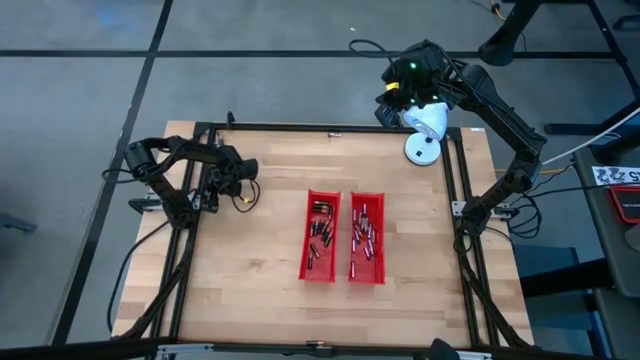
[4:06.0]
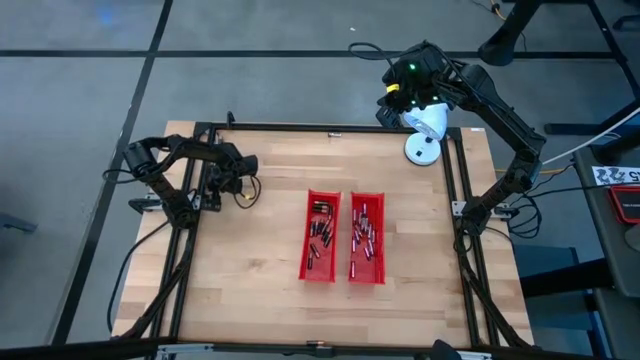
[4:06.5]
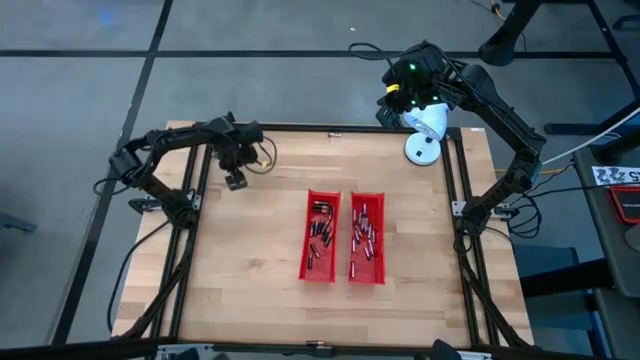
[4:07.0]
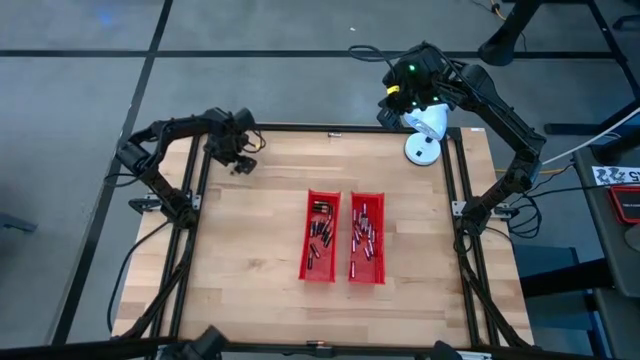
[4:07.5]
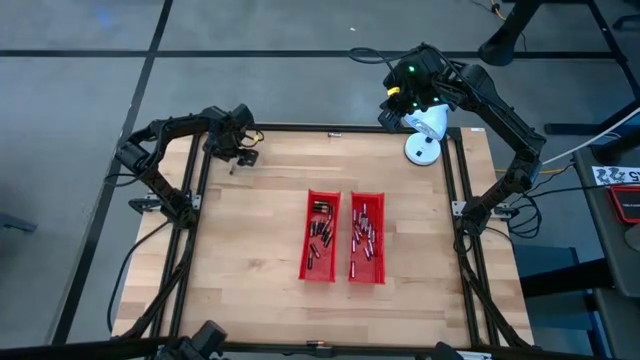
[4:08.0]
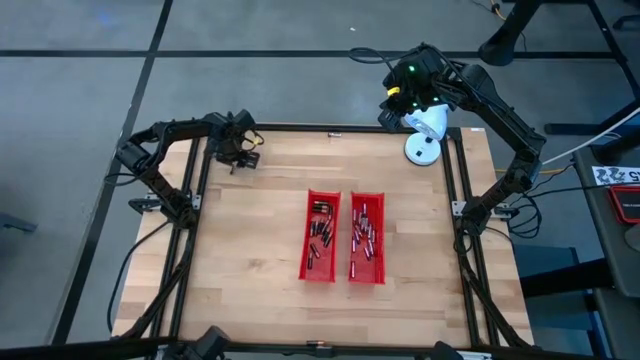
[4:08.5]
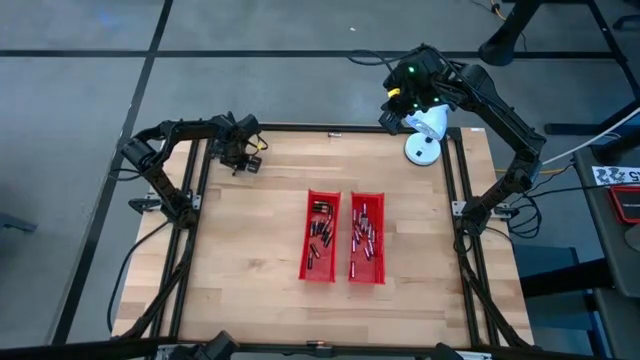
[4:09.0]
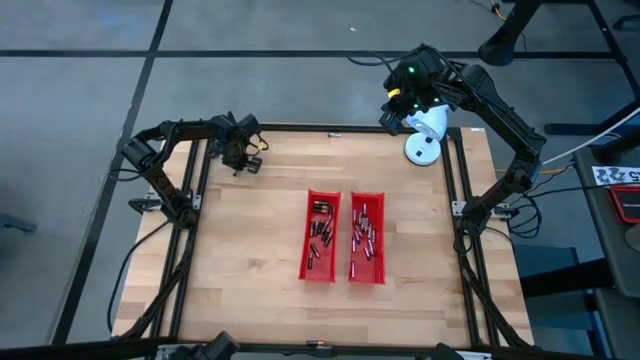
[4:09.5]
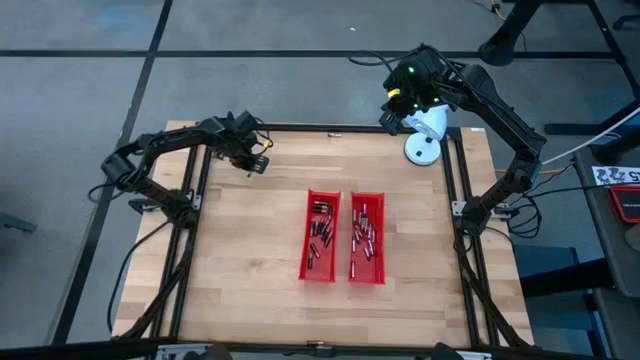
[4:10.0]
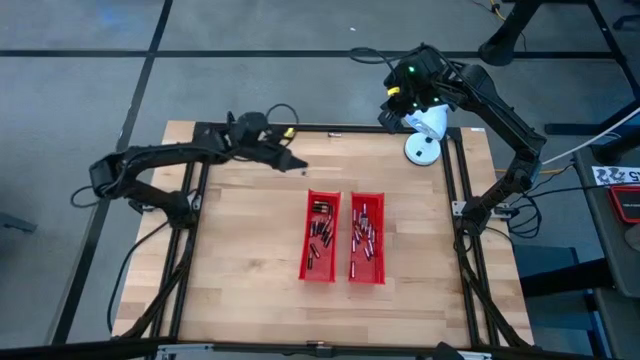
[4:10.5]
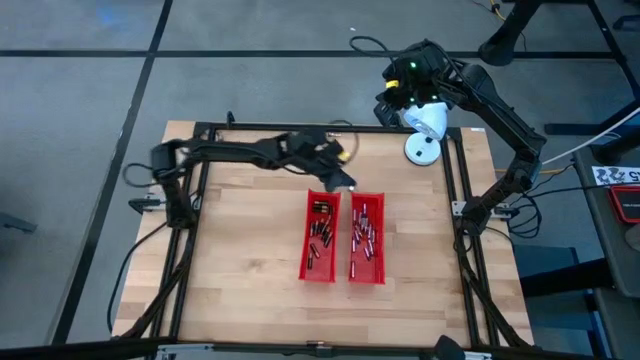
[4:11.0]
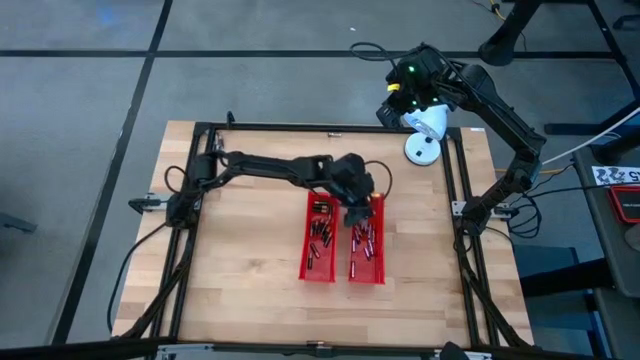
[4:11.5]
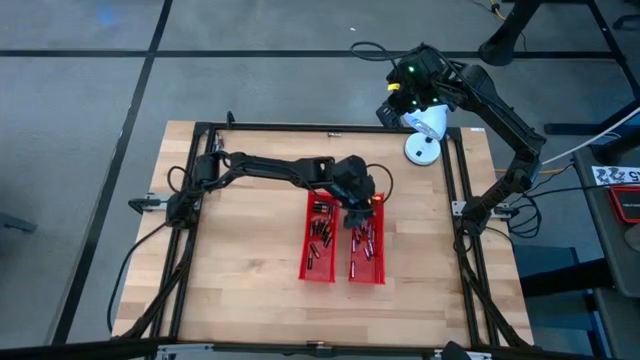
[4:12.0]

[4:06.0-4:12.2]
Task: Sort batteries
Put the silver battery into the right red bin

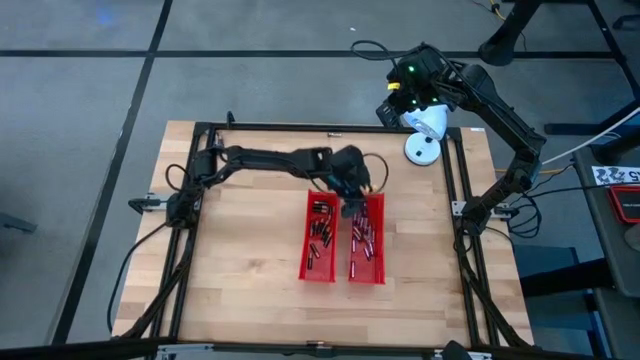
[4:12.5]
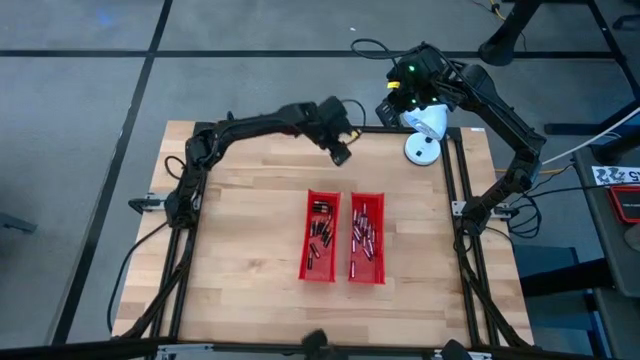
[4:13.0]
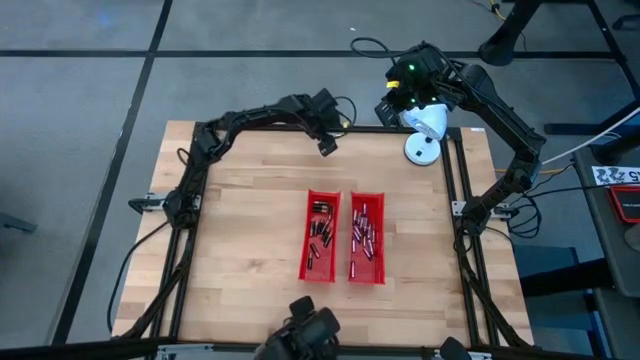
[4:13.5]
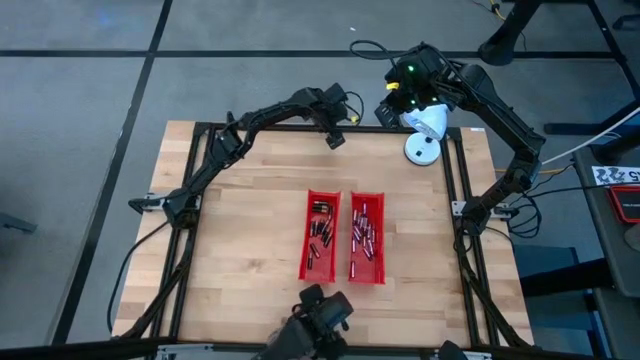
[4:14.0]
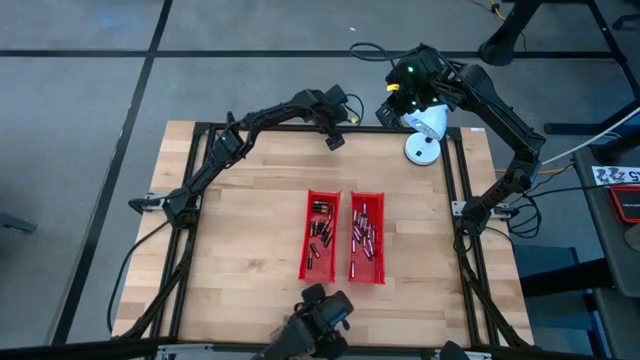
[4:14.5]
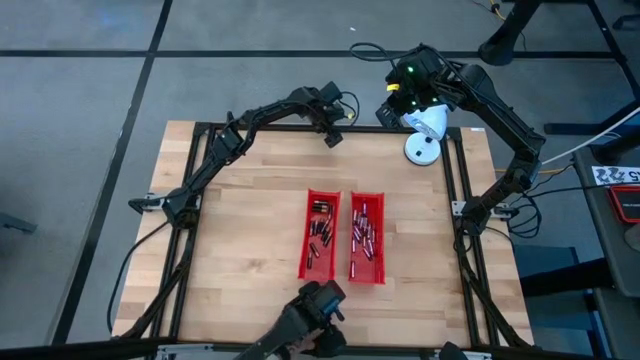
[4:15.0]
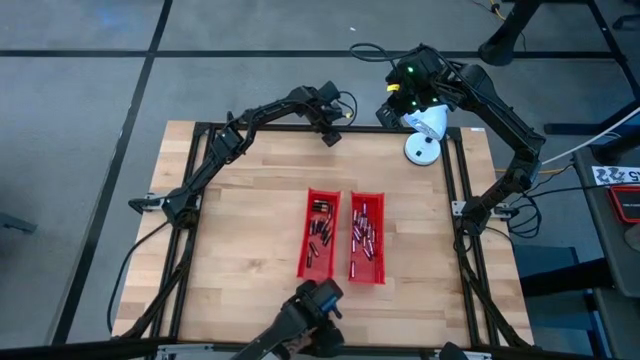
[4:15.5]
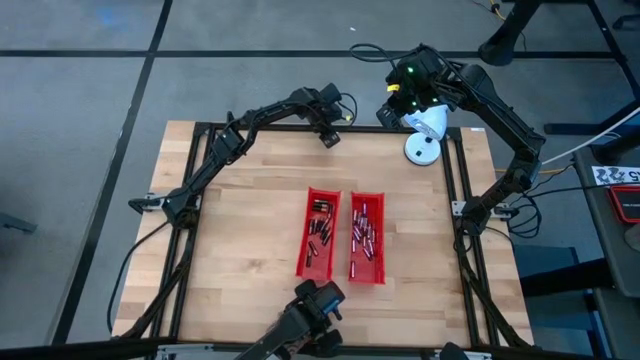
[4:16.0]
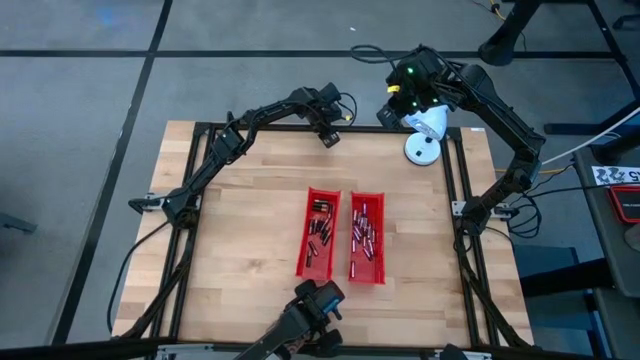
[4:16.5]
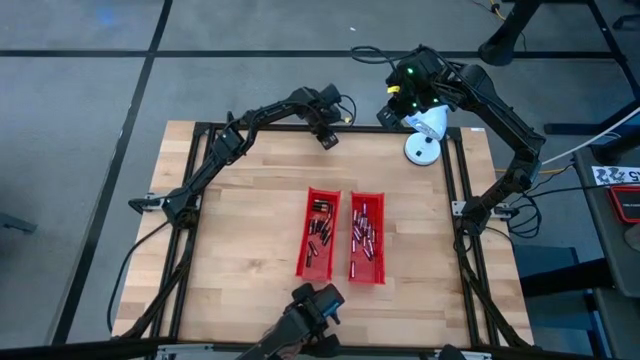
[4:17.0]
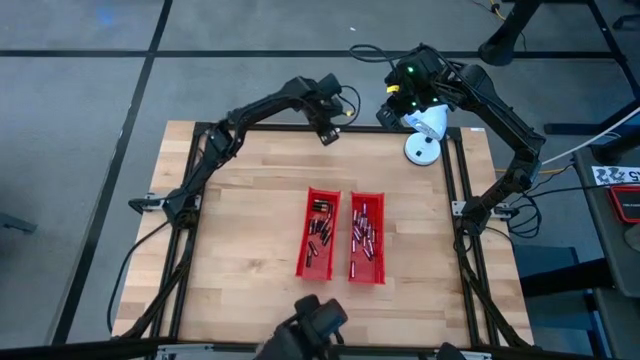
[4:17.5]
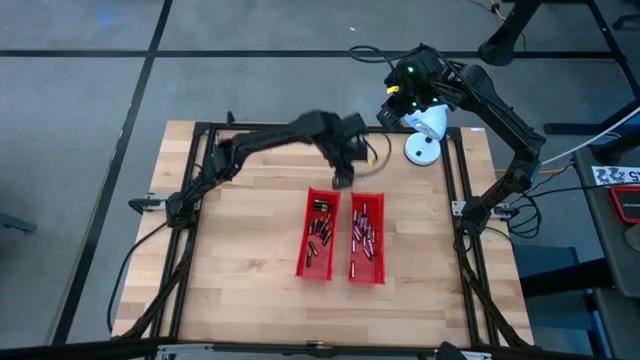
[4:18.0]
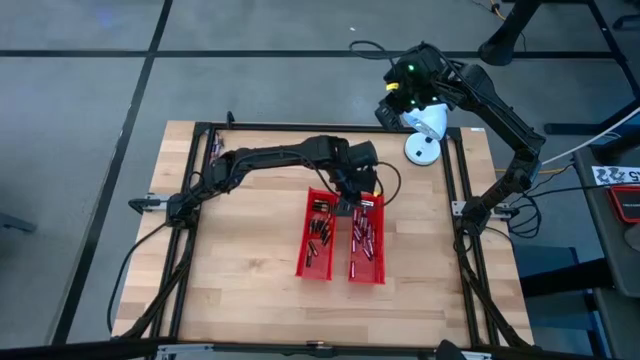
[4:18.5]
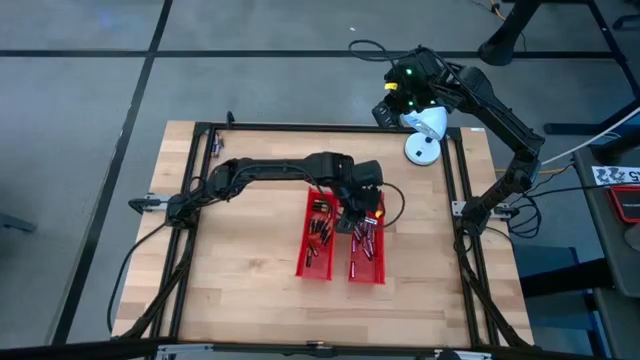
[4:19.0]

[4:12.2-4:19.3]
Put the silver battery into the right red bin

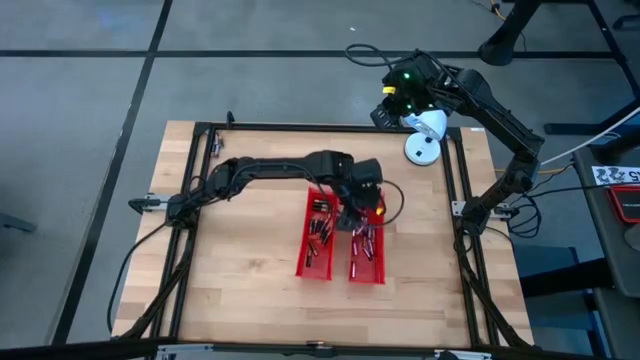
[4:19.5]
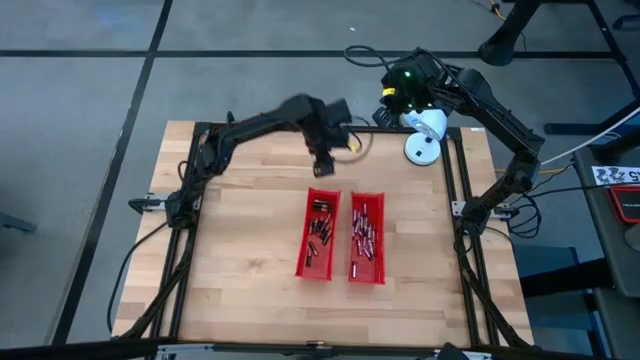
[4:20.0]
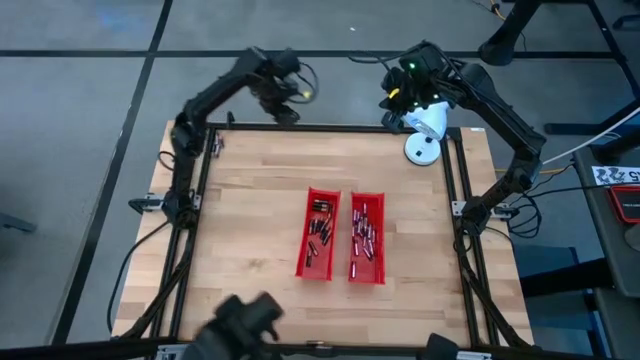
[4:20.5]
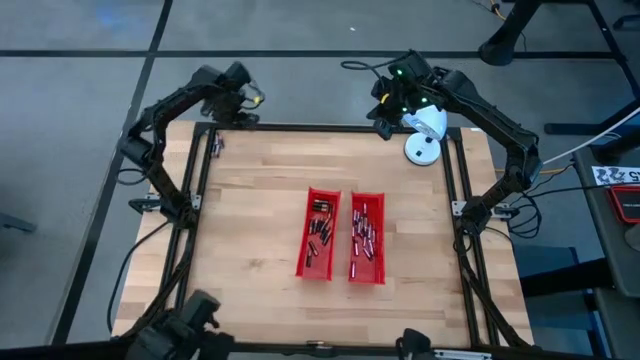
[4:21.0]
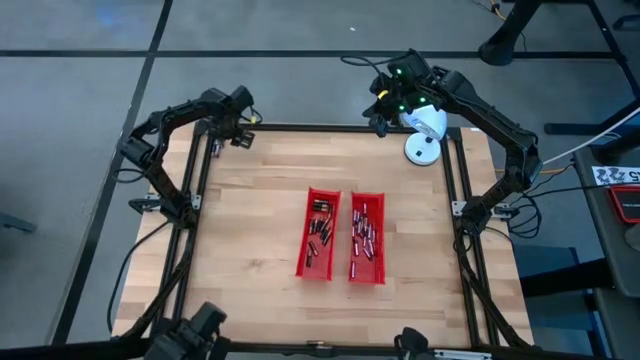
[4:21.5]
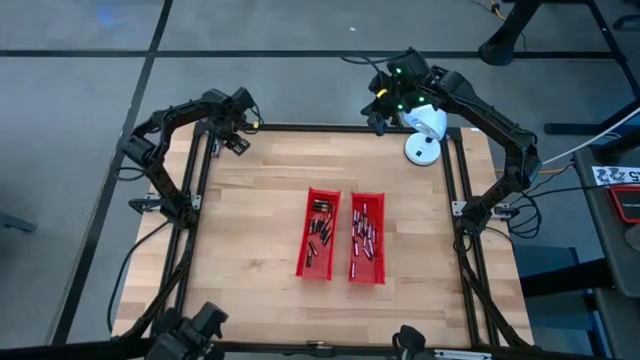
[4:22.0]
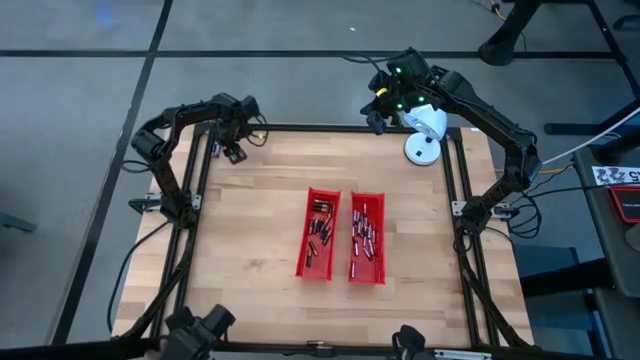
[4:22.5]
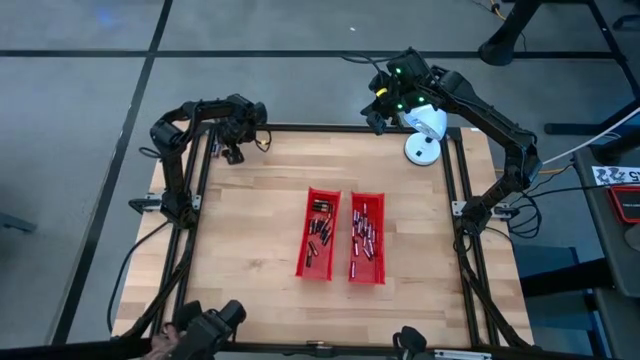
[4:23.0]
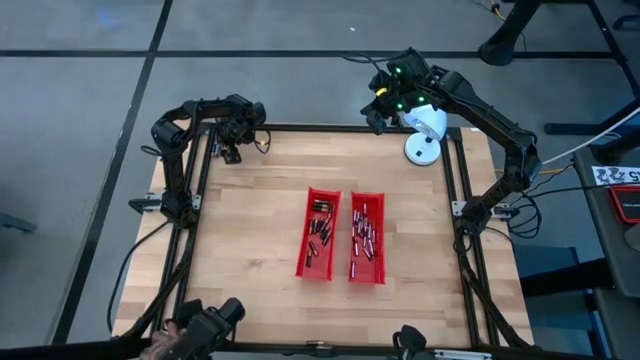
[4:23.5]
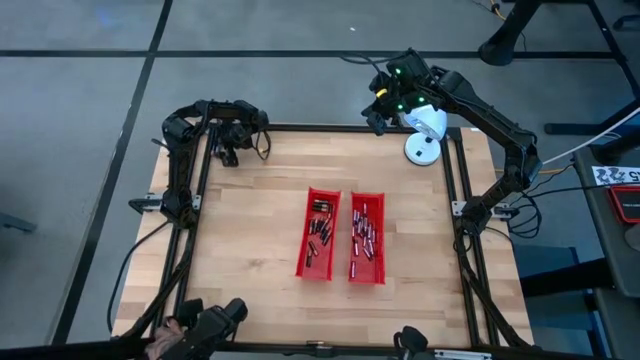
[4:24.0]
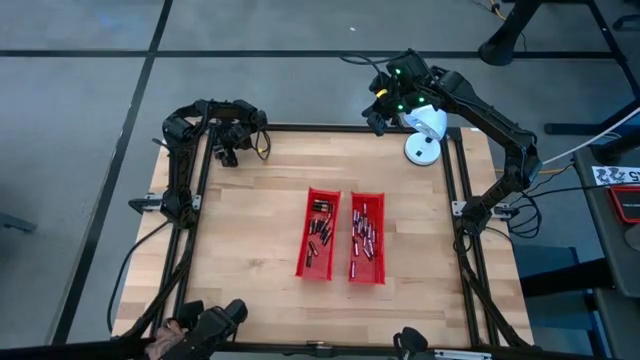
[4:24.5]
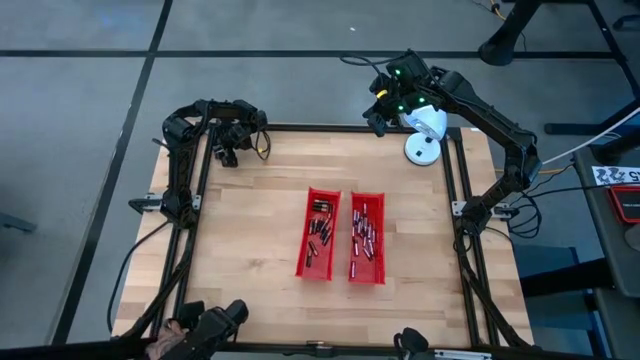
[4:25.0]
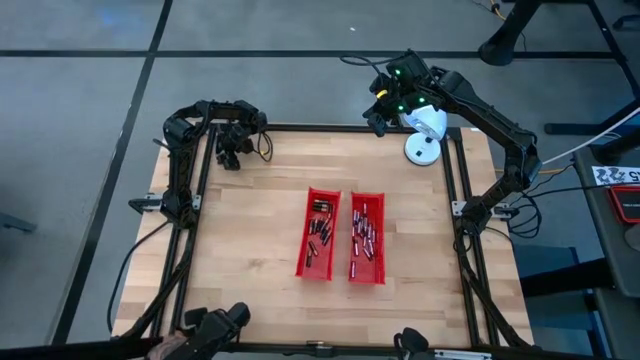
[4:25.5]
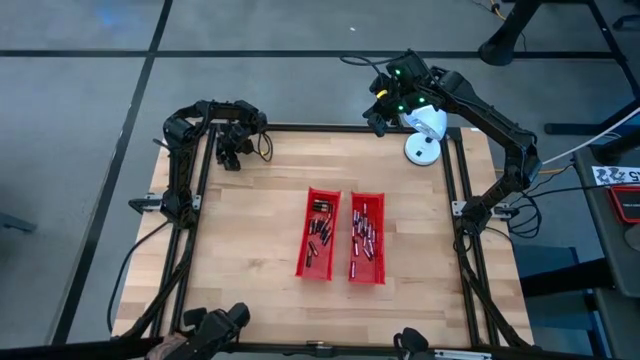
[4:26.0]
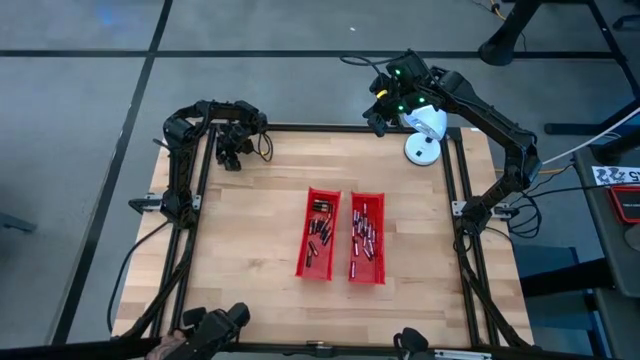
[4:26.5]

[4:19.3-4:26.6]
Put the black battery into the left red bin
